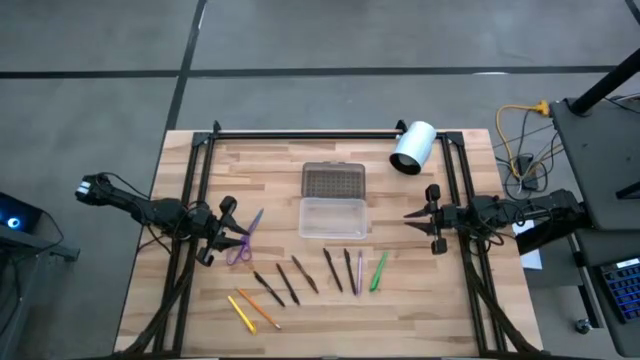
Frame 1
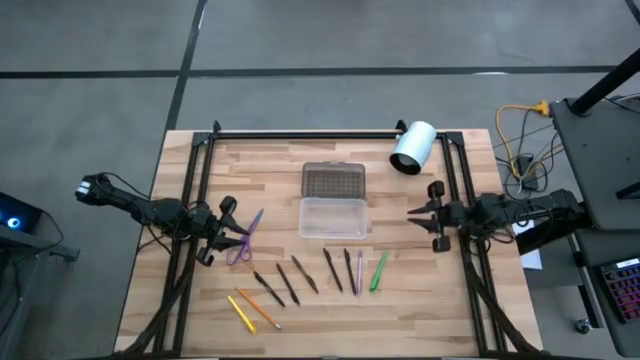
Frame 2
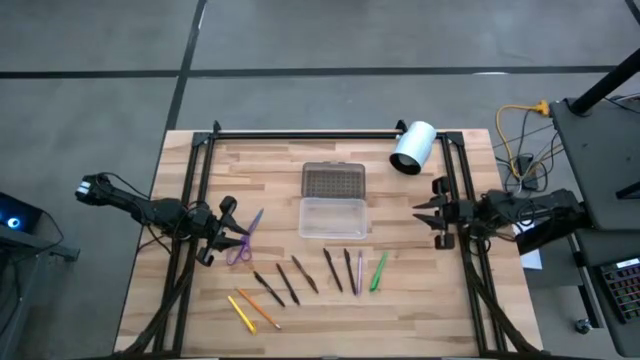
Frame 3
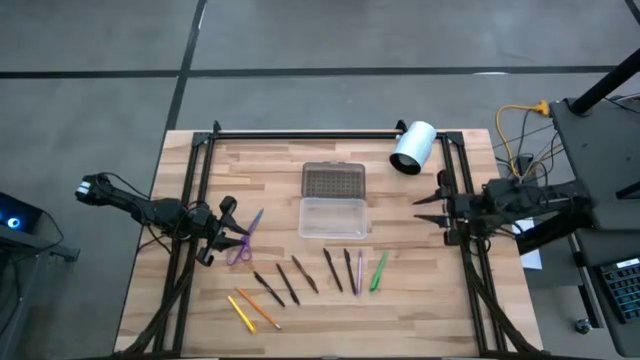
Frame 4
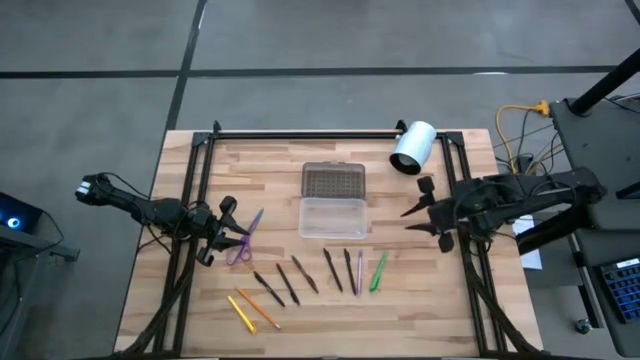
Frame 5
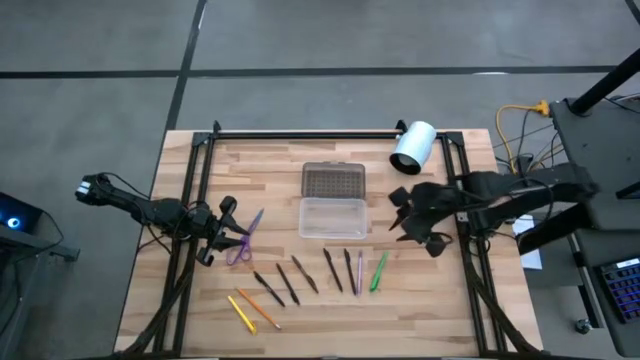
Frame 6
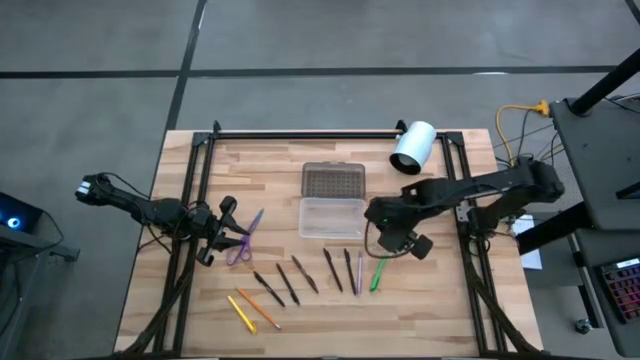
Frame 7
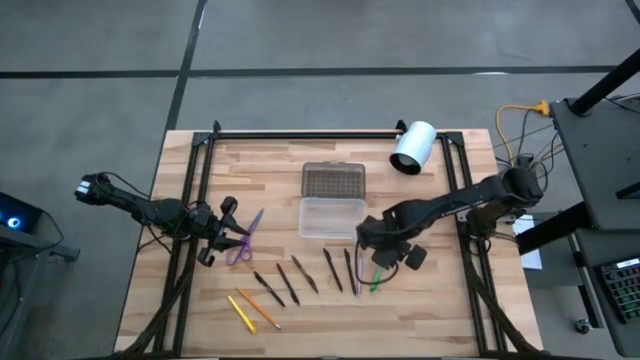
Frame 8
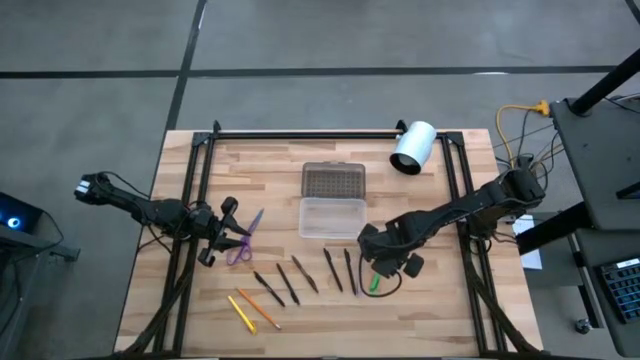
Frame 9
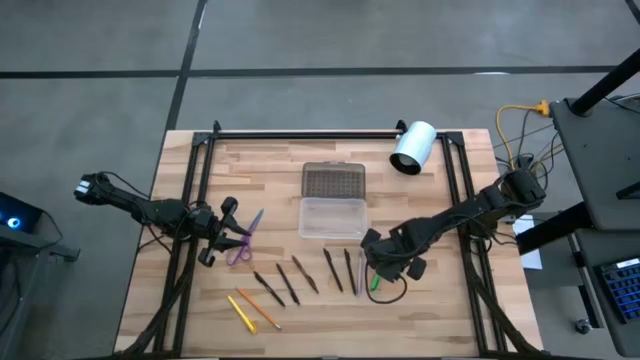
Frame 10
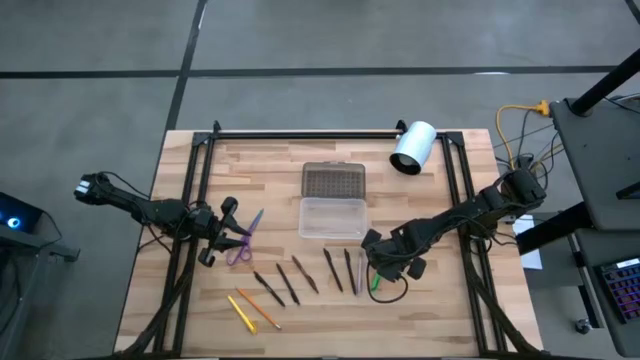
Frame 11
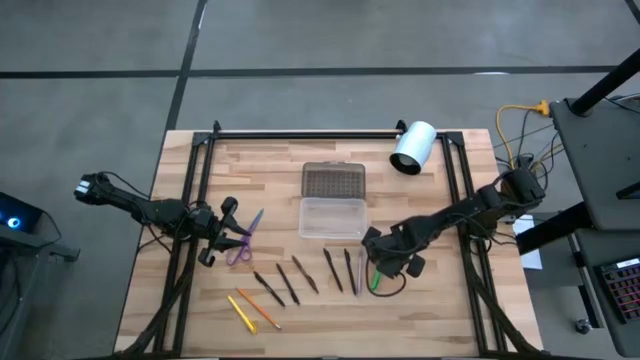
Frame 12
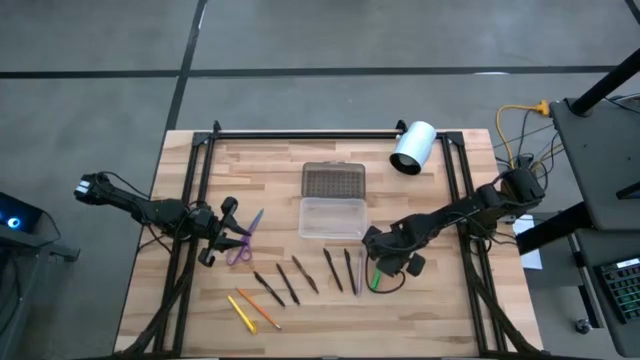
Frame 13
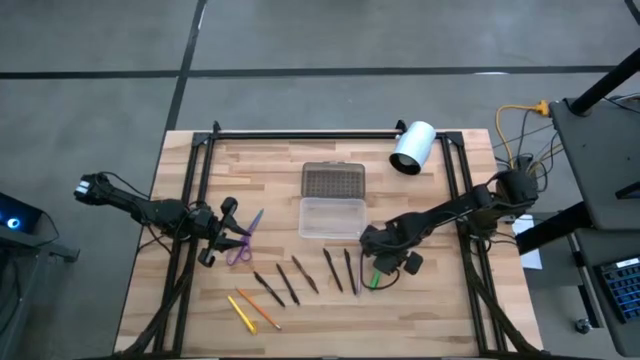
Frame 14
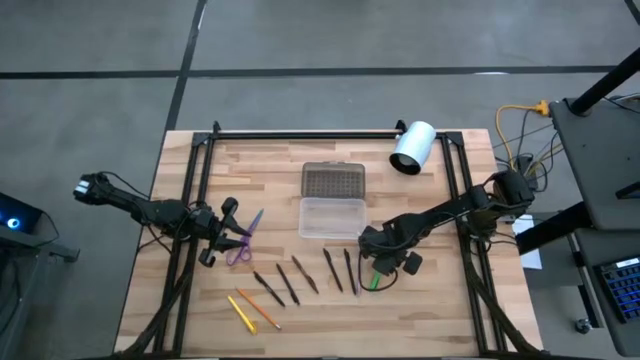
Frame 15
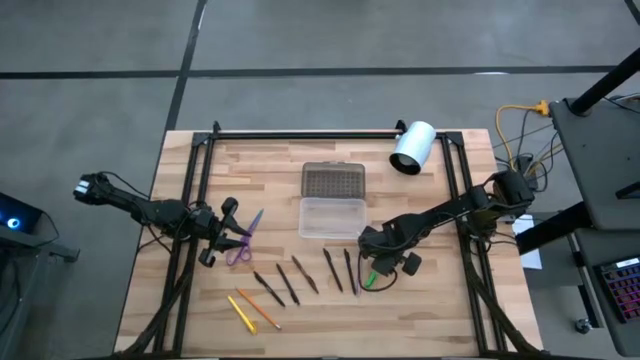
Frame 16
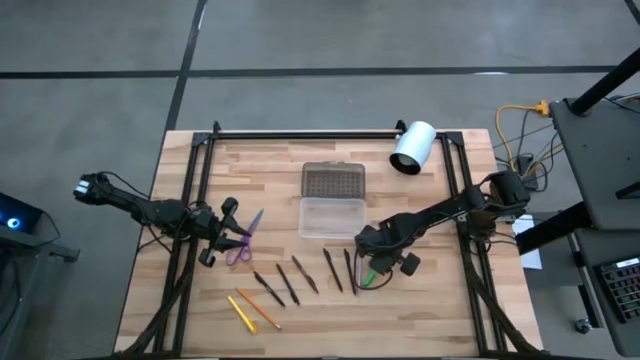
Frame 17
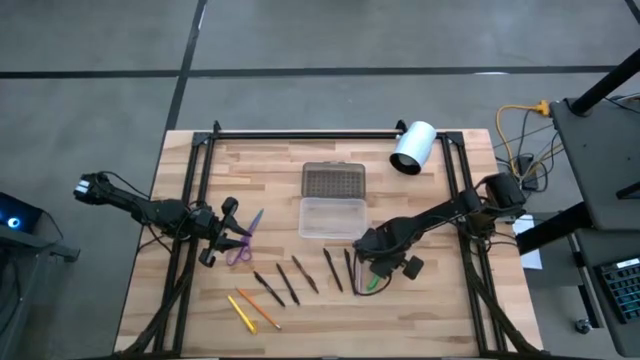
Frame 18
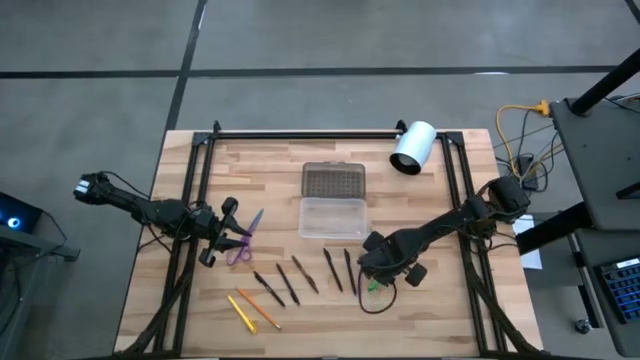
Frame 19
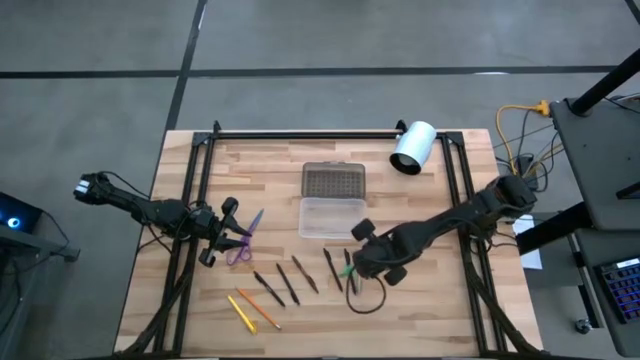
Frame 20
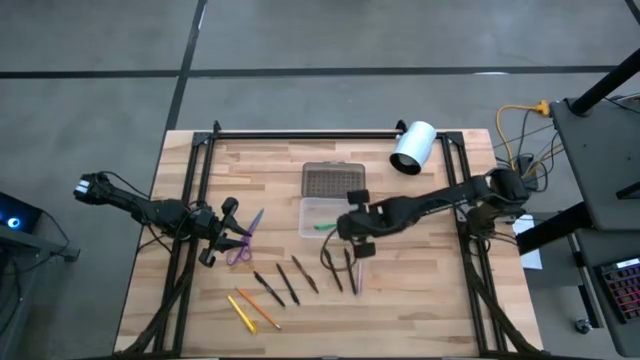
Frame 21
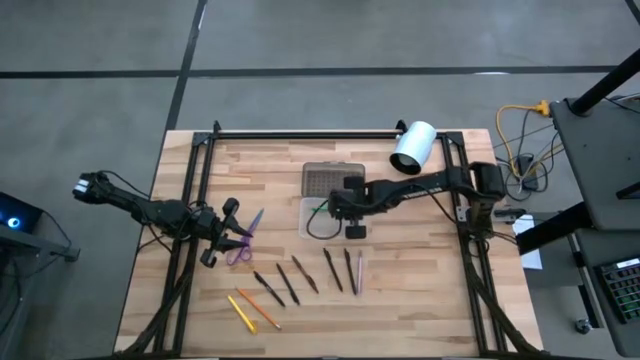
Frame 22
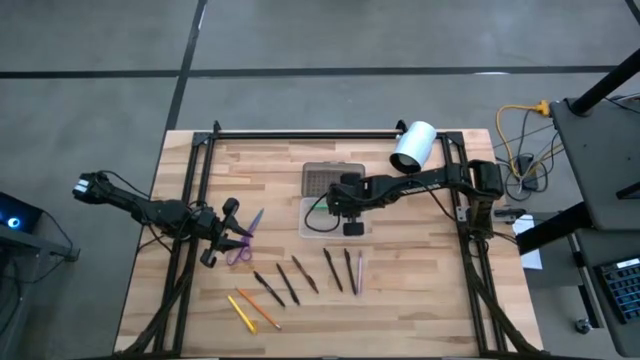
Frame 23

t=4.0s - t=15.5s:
Task: Pick & place school supplies into a supply box
Put the green pen into the white and black supply box

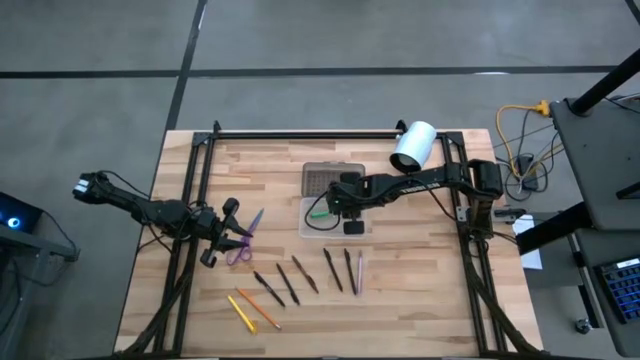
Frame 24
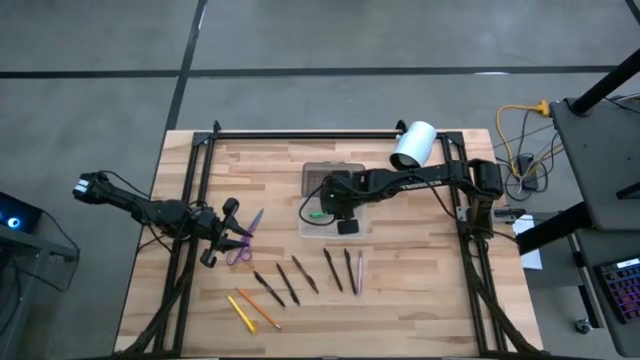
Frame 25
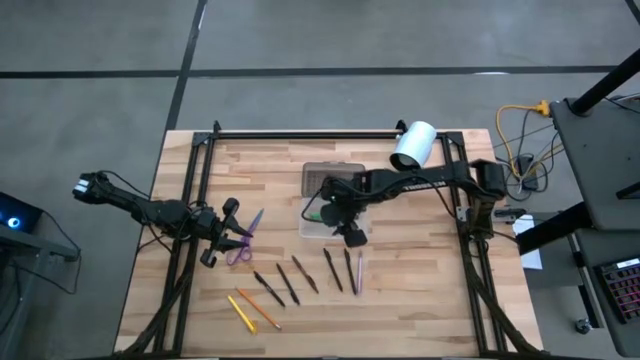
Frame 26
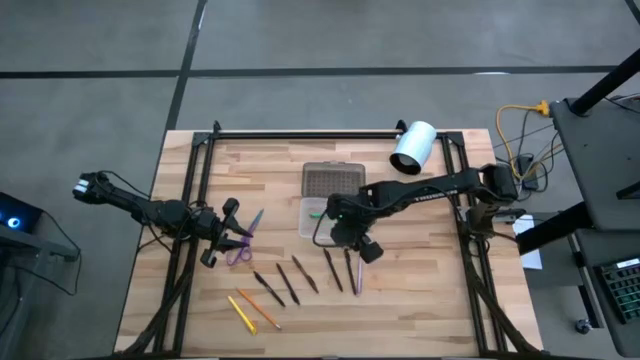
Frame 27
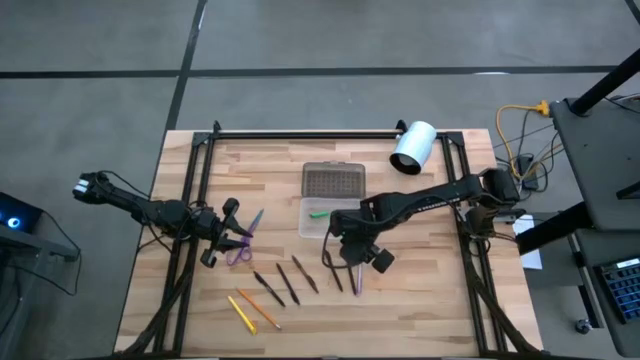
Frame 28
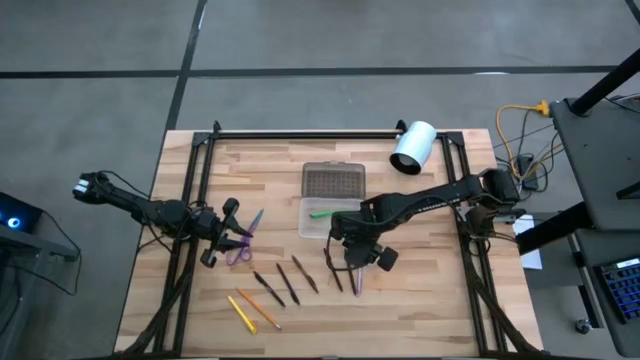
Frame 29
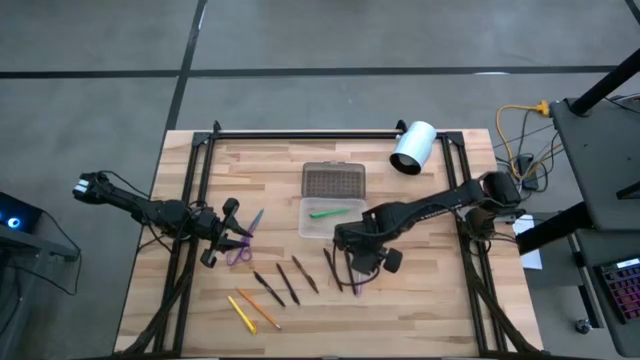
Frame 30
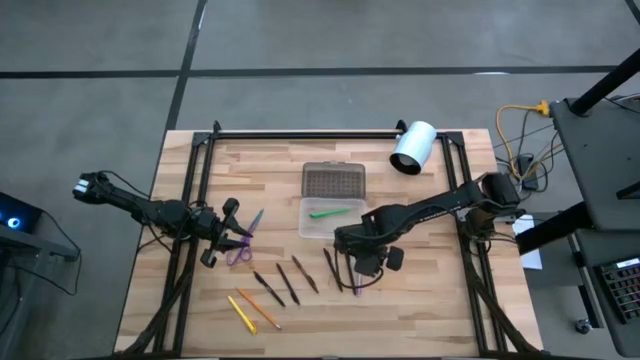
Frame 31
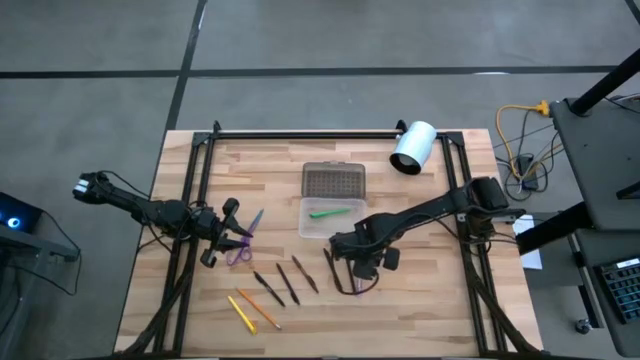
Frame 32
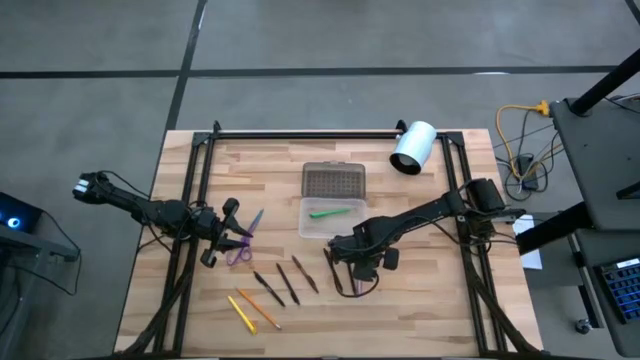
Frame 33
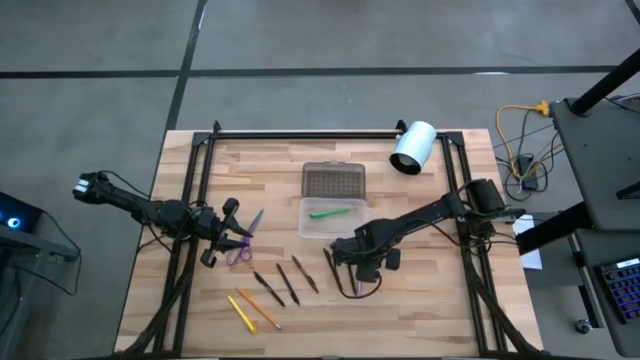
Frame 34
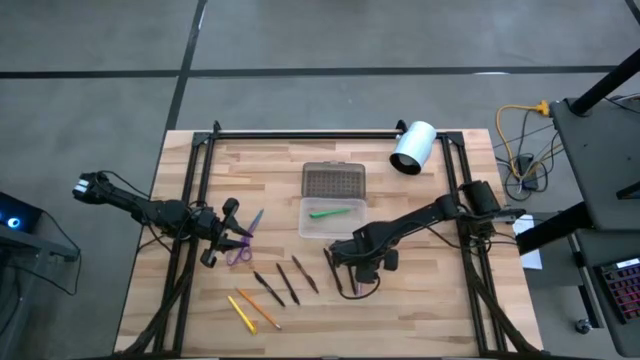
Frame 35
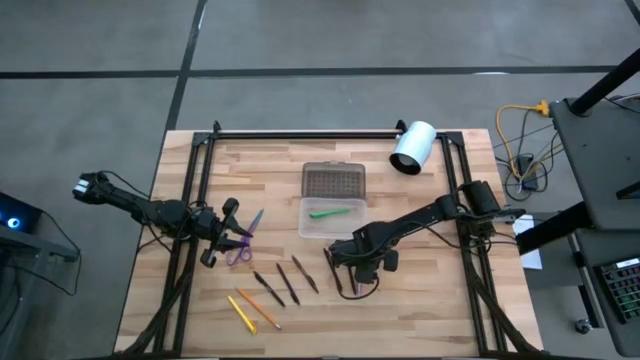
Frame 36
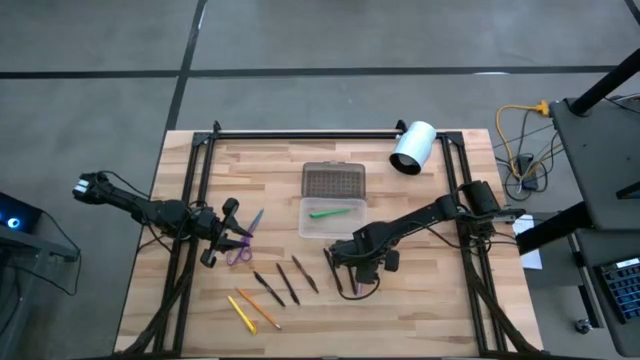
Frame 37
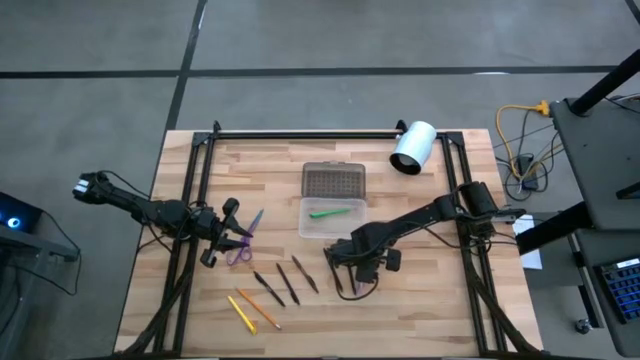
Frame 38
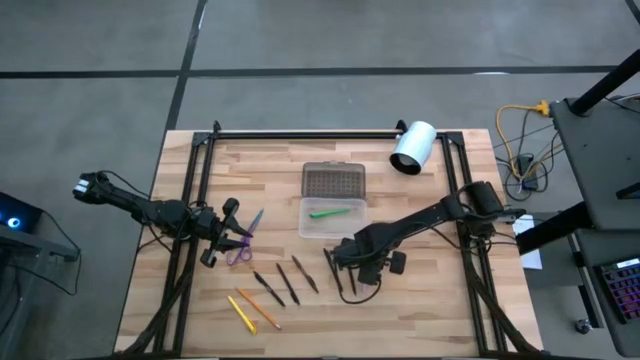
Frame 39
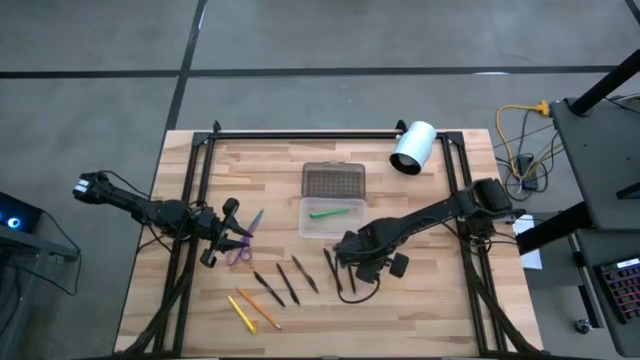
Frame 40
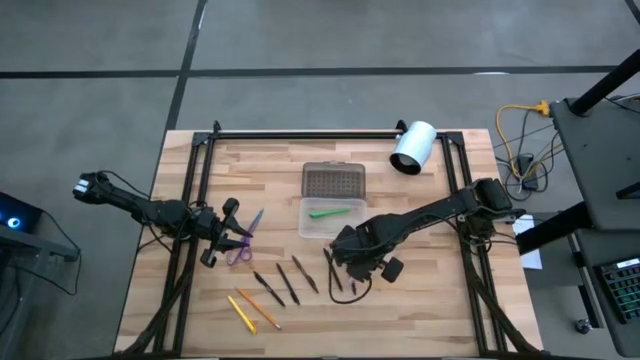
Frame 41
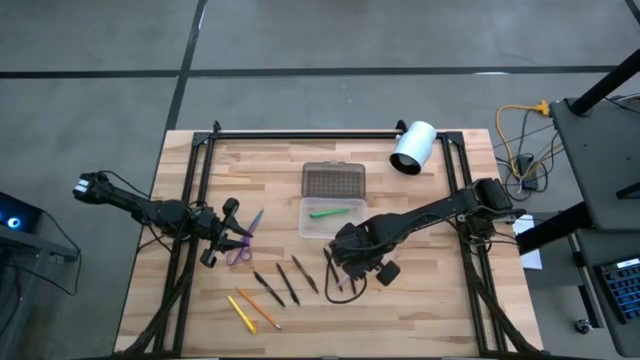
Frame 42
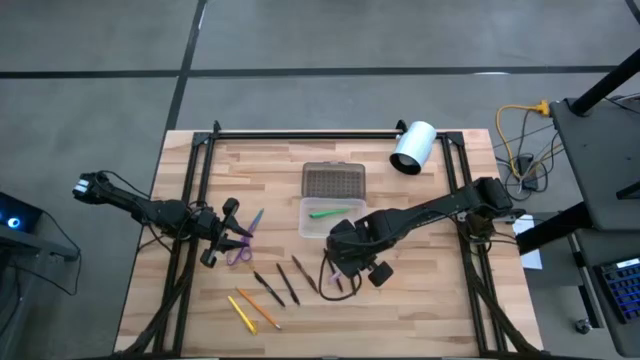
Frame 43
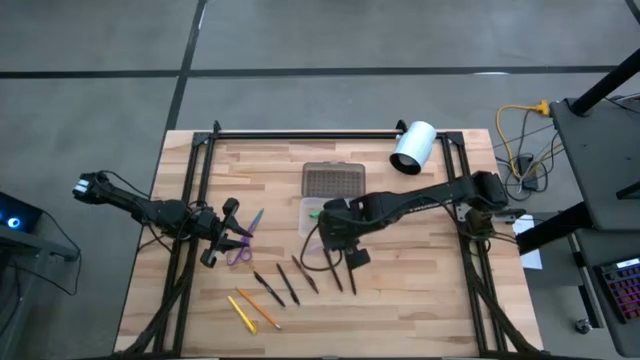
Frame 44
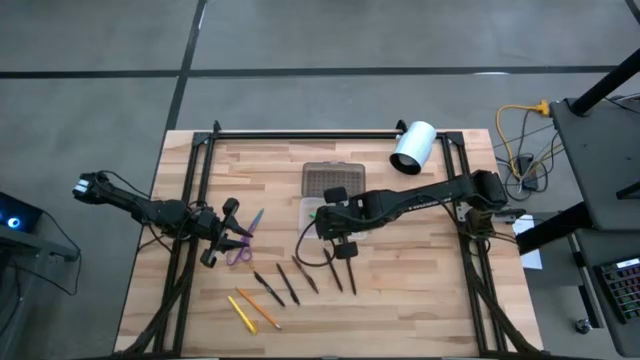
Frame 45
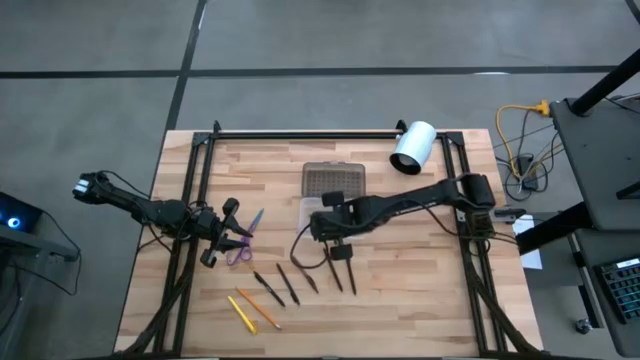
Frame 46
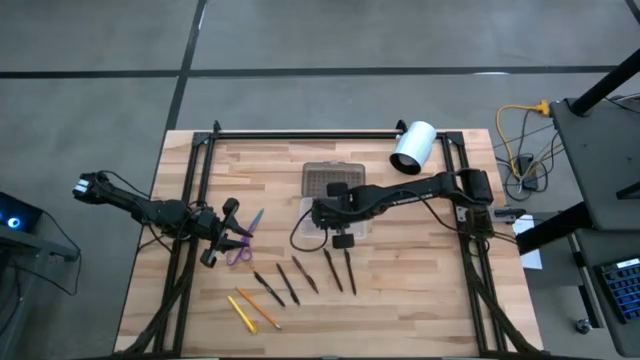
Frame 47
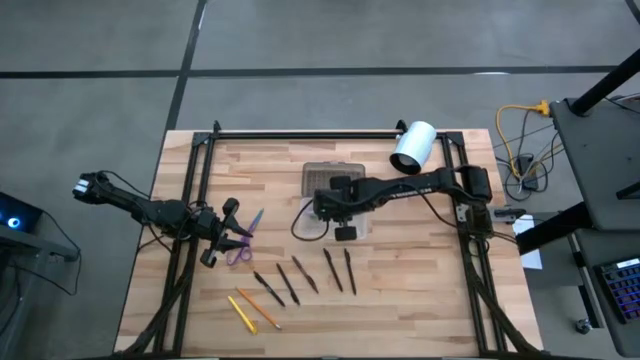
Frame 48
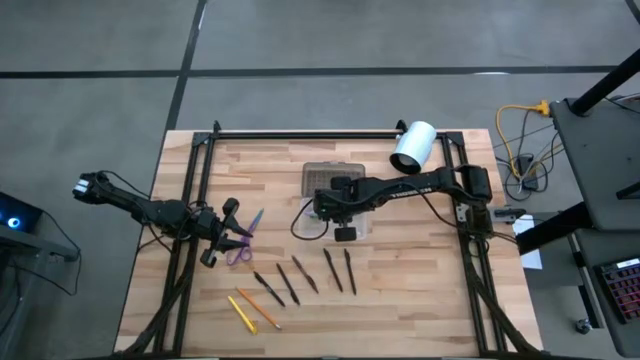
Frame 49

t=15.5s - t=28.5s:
Put the purple pen into the white and black supply box
